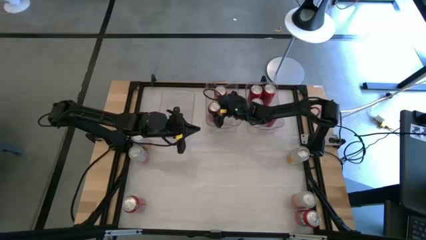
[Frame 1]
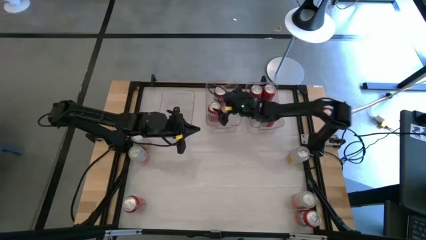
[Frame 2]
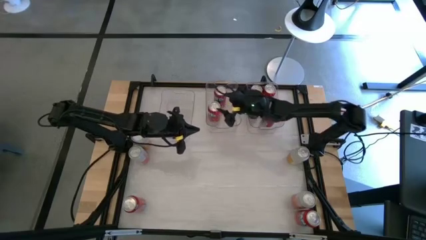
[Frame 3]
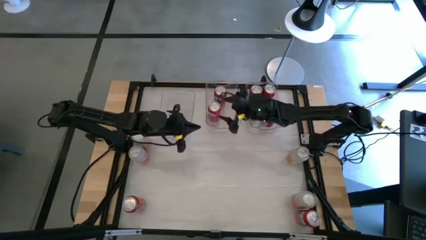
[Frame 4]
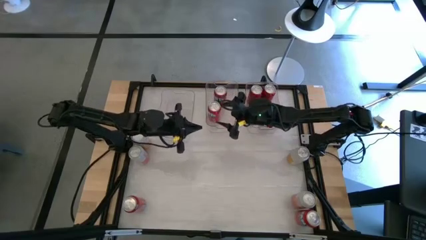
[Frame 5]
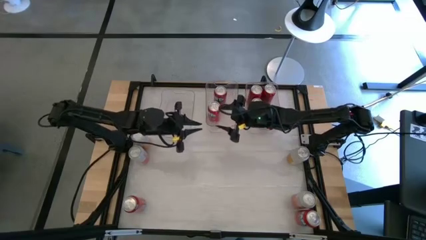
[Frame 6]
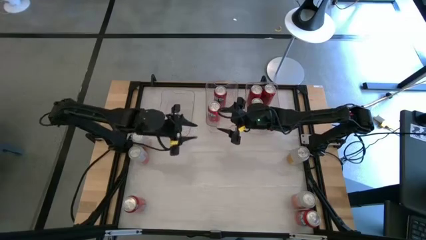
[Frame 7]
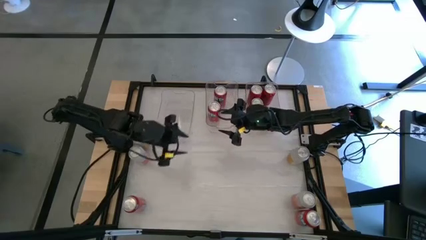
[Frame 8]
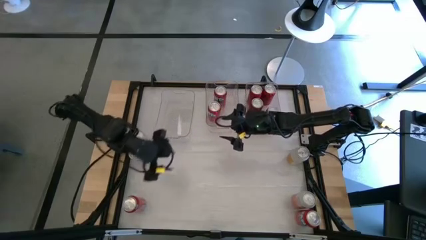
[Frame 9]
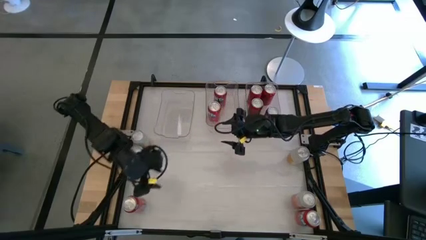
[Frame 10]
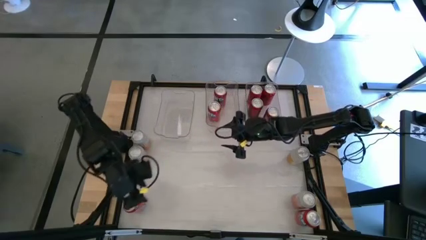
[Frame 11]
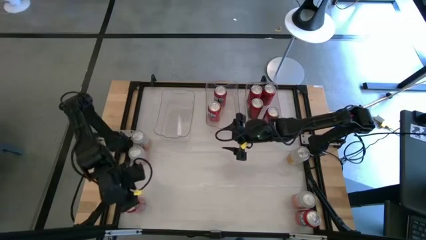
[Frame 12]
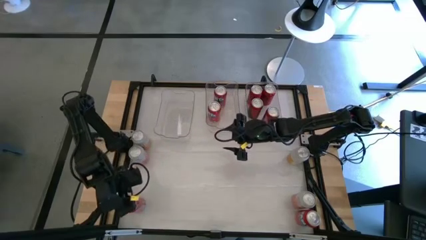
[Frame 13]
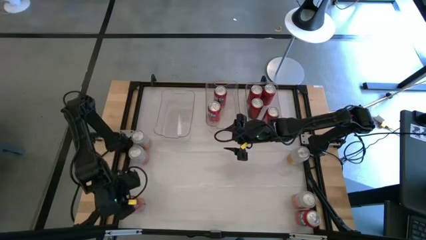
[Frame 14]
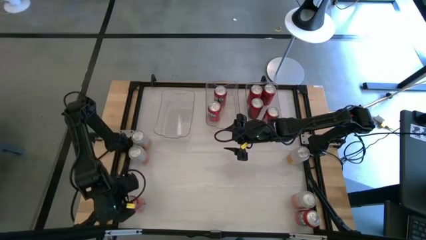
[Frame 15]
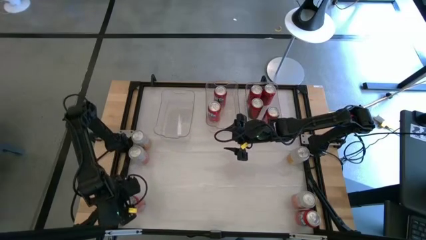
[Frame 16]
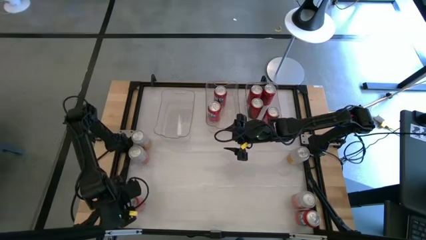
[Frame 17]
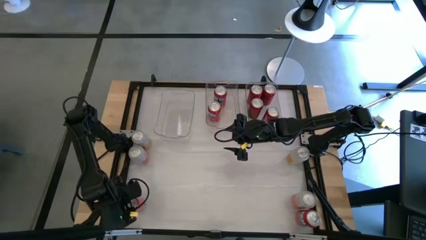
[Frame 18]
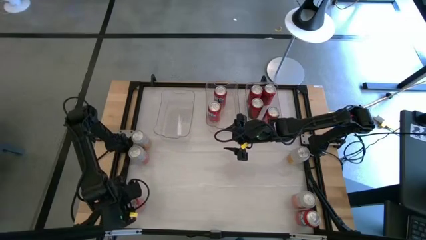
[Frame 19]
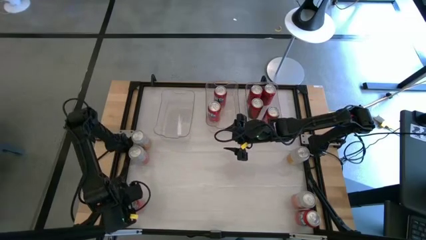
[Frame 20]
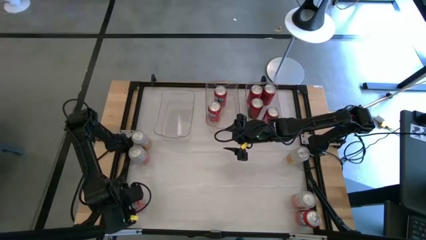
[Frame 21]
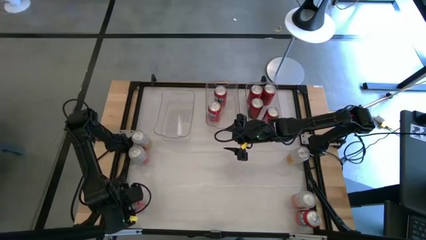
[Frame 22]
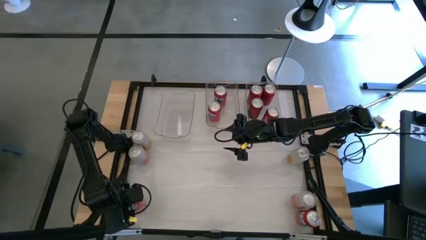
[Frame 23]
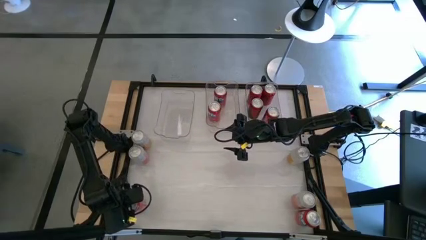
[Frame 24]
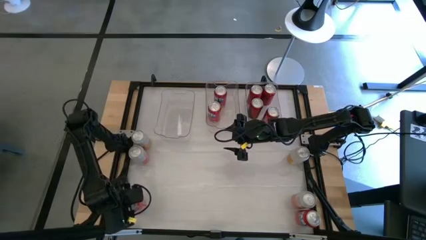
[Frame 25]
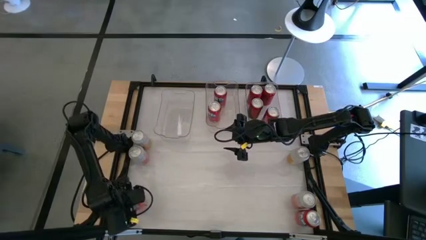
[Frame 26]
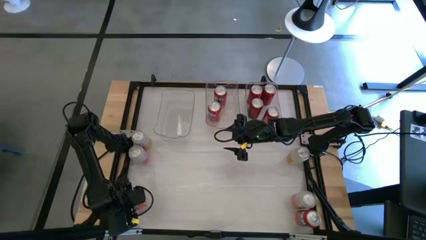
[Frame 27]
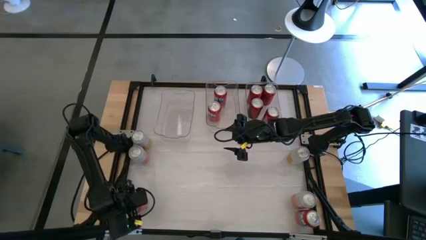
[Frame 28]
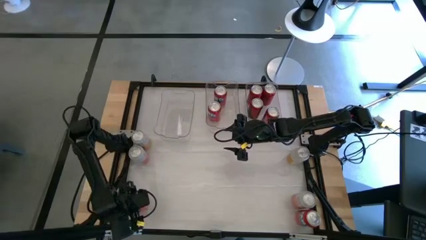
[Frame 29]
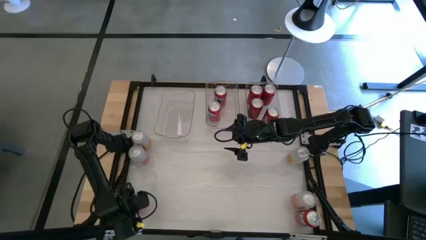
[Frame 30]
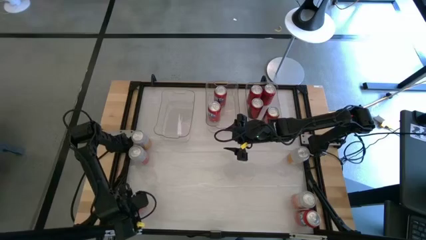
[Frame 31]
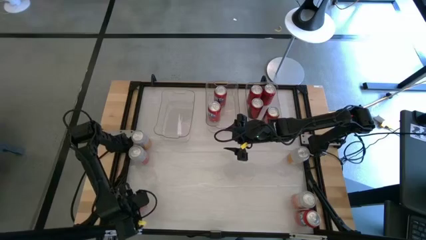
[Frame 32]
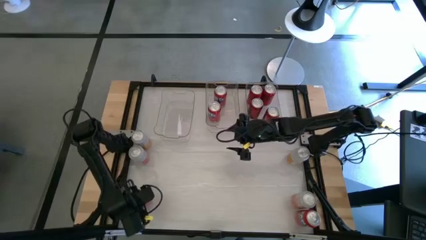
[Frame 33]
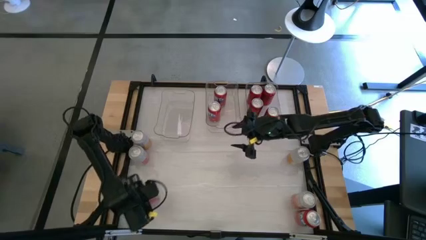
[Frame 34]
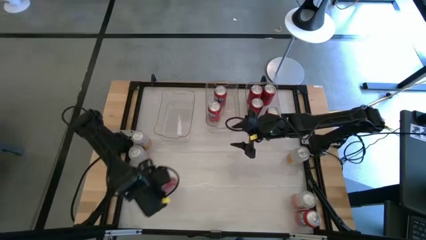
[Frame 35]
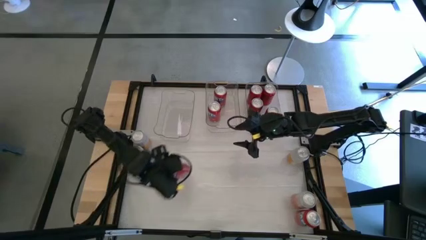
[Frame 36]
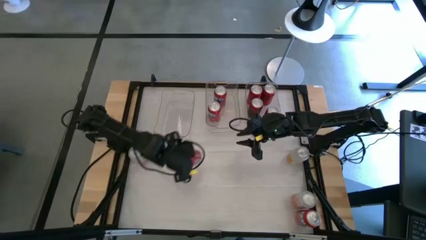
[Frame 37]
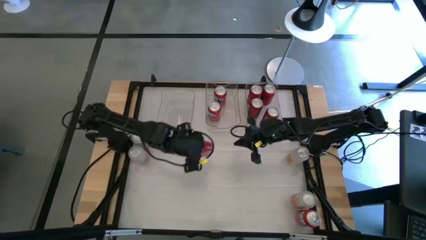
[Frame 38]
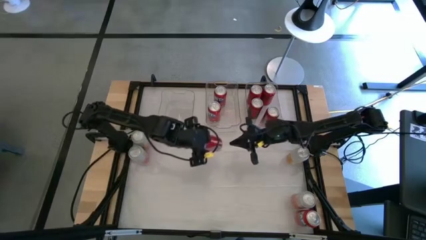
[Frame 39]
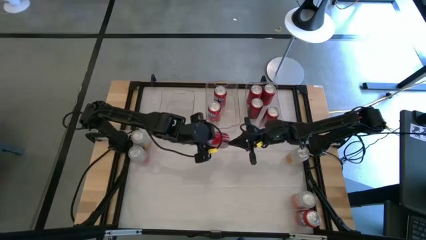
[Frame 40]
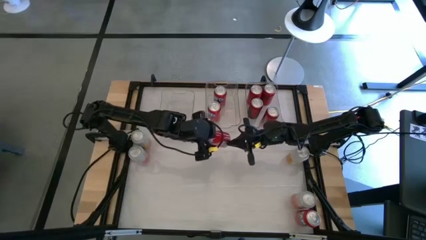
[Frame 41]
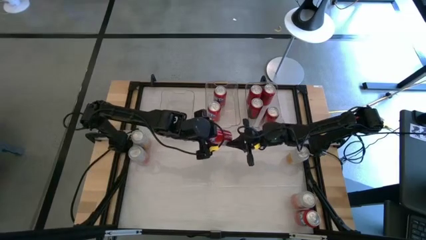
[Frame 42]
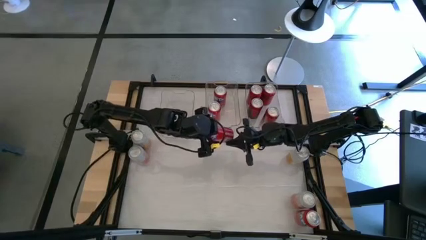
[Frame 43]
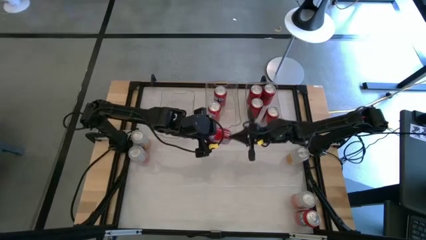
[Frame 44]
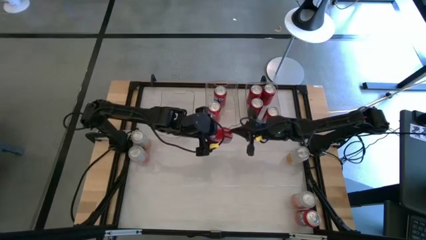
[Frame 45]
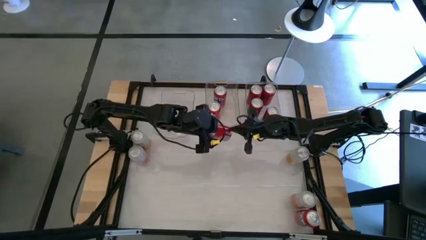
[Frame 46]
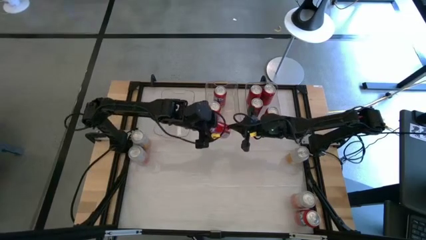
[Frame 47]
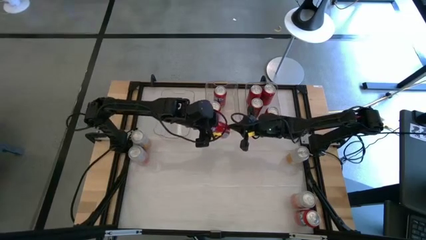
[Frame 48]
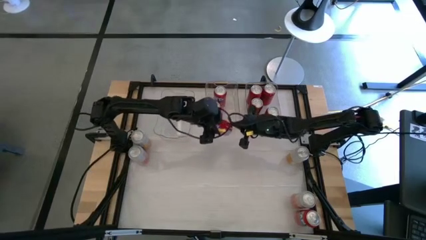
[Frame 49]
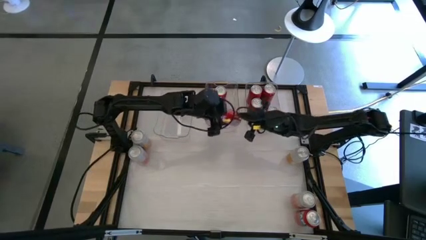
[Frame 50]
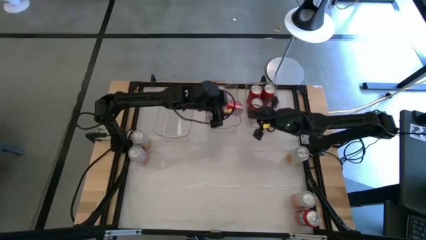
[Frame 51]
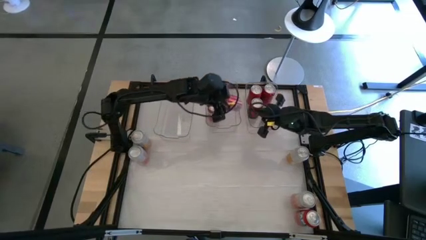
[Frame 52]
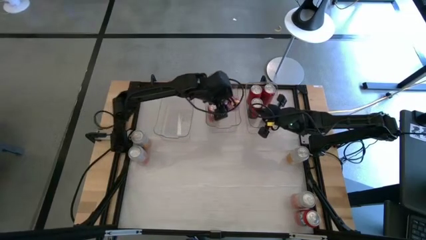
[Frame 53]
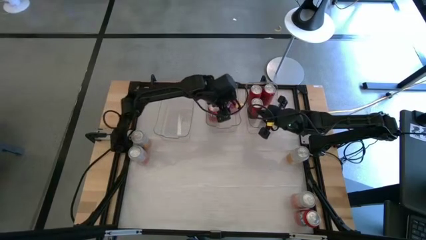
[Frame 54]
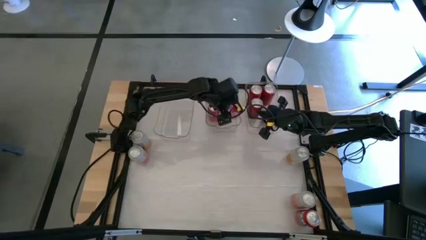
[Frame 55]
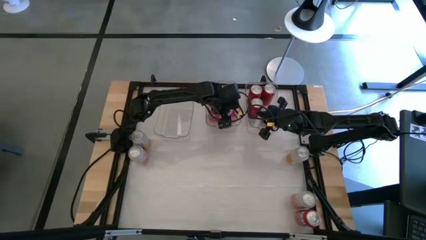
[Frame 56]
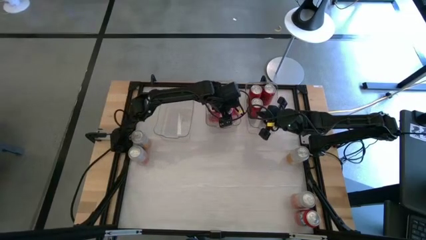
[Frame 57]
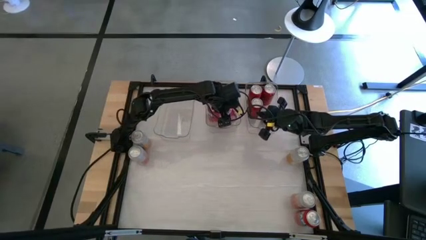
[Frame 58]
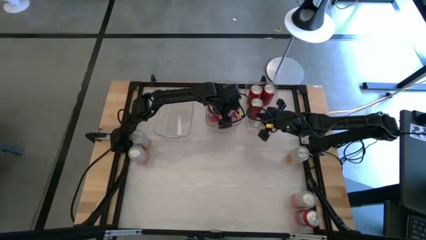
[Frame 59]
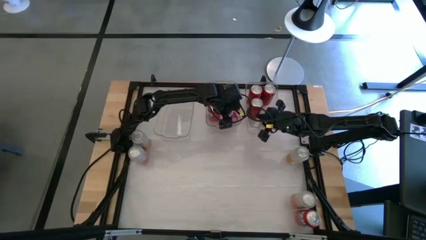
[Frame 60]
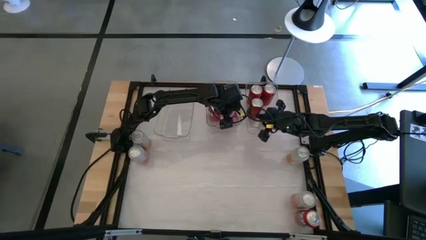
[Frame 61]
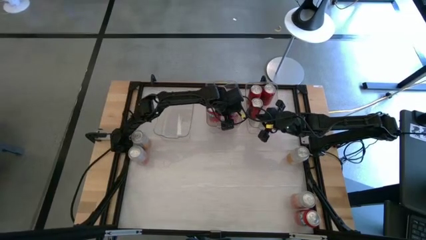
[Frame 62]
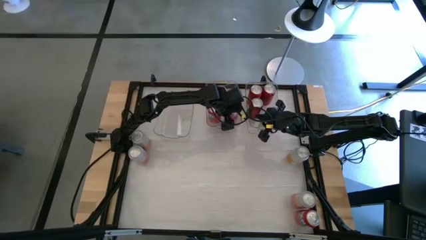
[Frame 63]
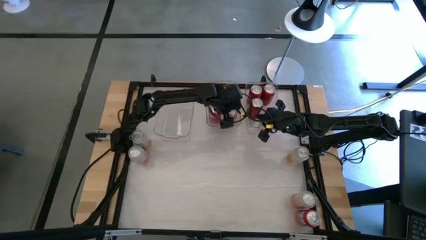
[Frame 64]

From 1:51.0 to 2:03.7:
Task: Sort soda cans
Put the left red soda can into the middle transparent bin

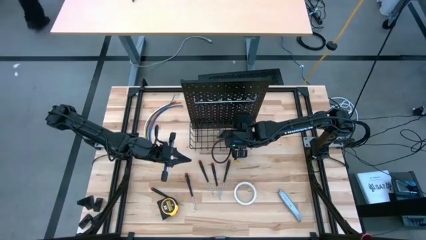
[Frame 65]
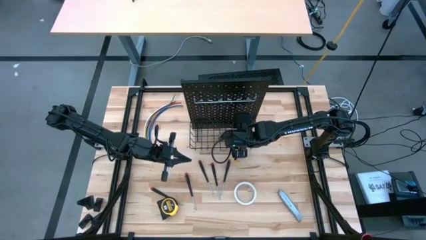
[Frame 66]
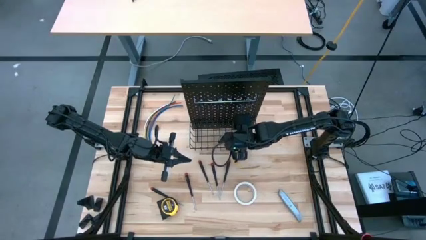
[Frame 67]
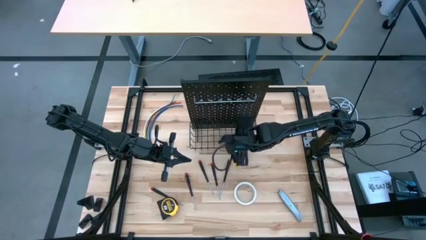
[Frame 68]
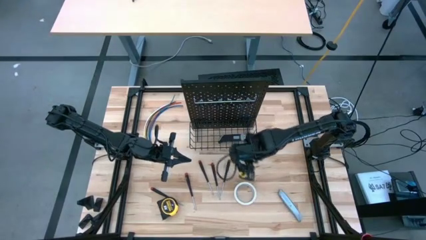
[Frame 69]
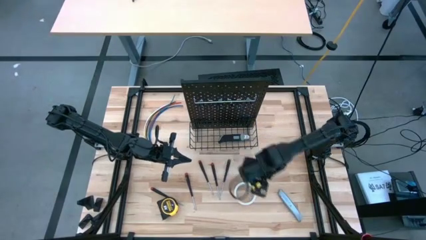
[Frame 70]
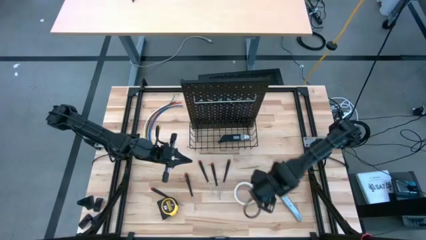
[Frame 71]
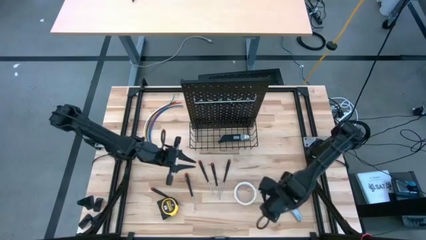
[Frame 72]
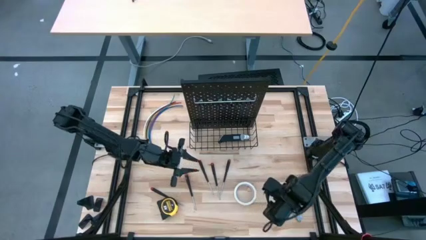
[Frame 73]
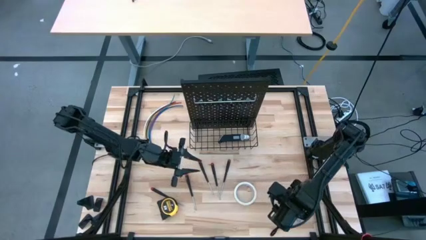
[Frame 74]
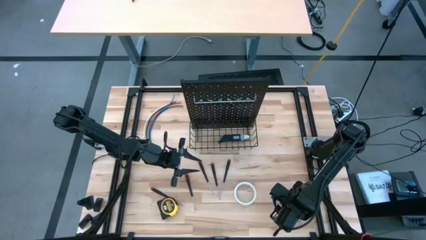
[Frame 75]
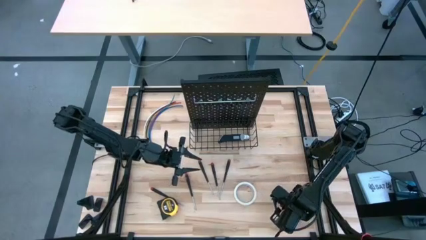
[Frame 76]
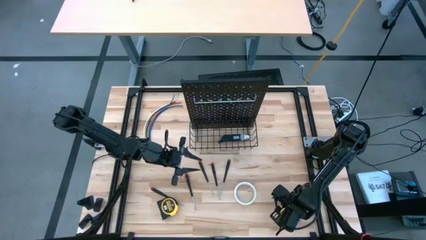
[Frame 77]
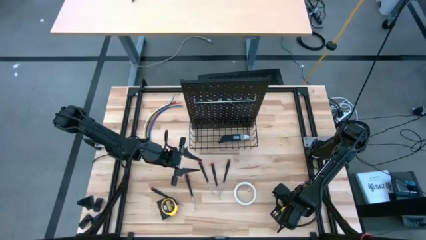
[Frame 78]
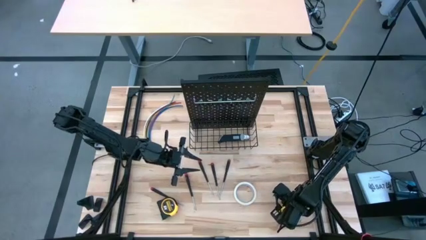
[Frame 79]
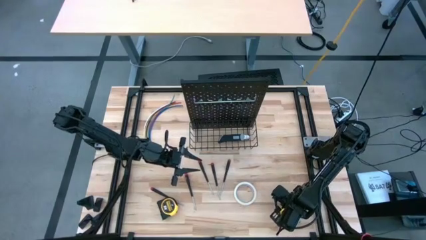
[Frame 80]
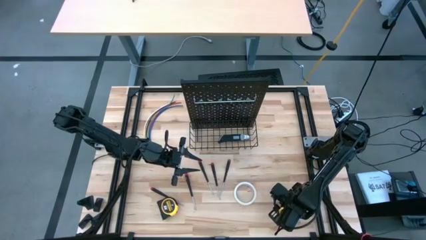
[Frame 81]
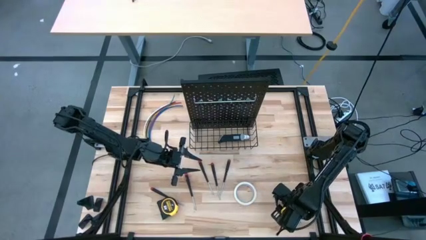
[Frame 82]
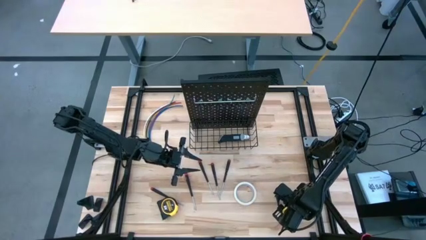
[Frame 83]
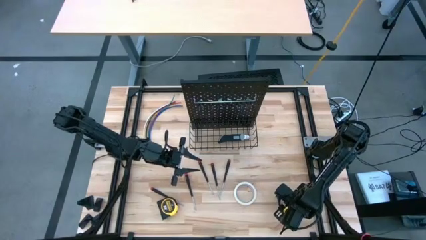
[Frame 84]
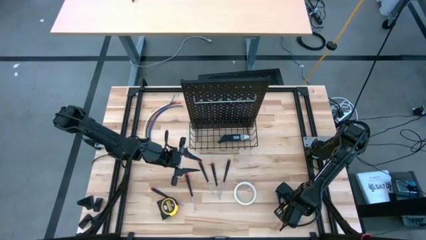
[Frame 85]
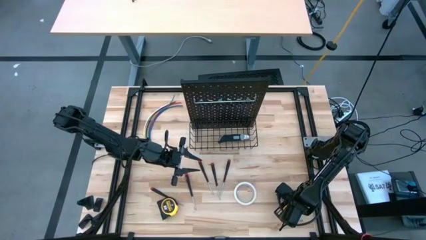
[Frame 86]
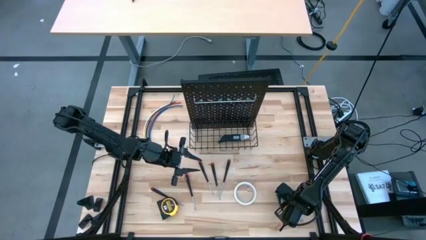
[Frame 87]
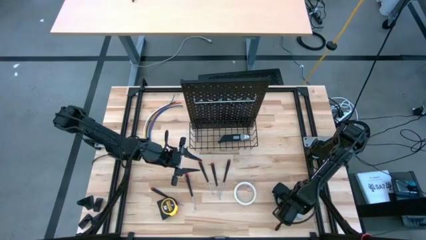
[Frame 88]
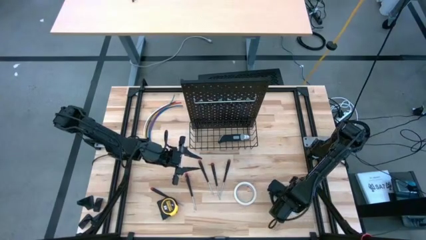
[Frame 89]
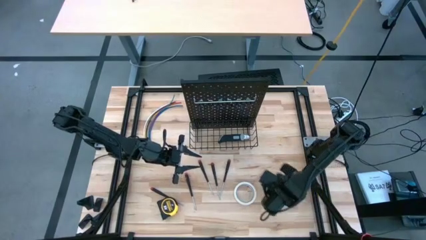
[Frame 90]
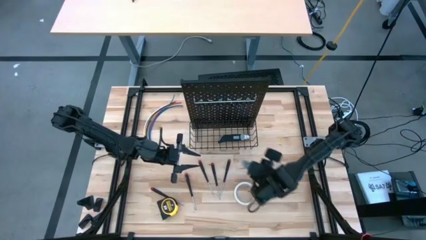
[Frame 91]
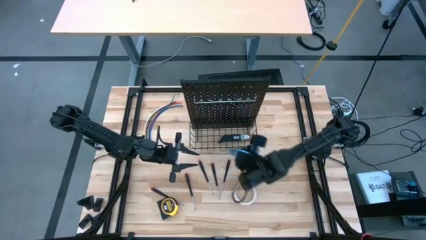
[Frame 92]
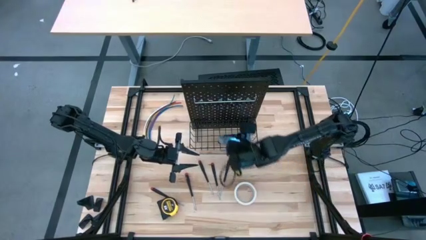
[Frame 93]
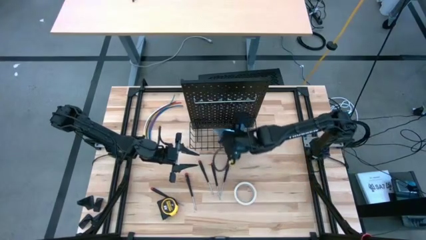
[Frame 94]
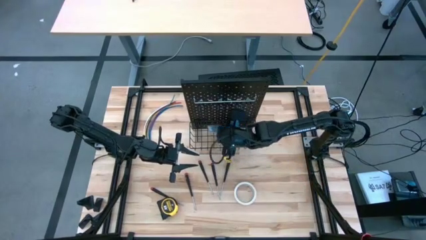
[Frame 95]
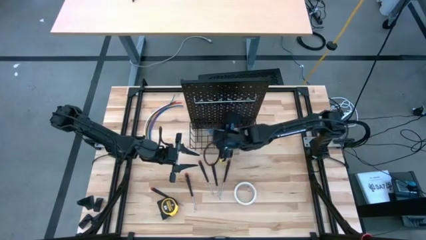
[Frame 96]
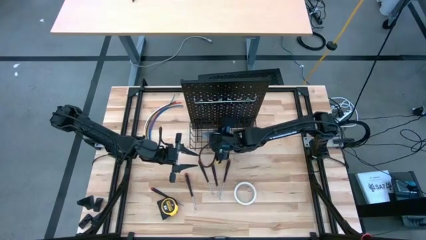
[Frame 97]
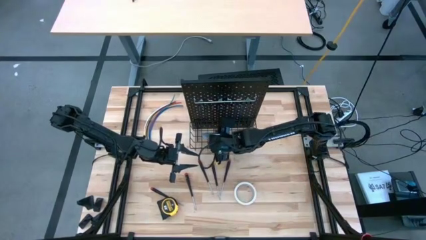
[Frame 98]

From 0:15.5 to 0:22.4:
Task: Hang tools onto peg board
Put the blue cutter into the wire basket on the pegboard
